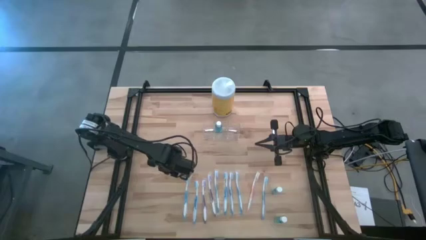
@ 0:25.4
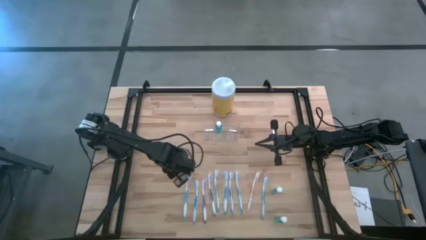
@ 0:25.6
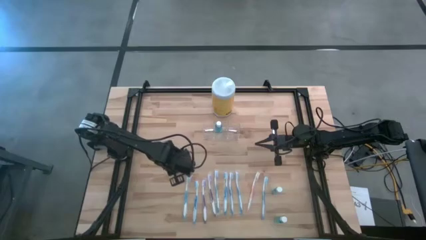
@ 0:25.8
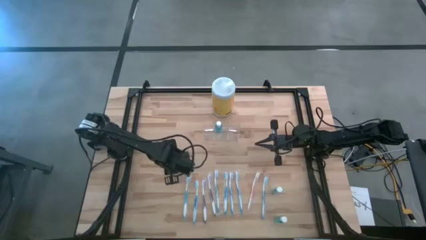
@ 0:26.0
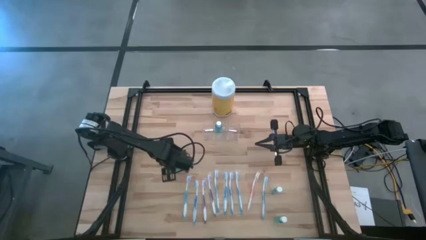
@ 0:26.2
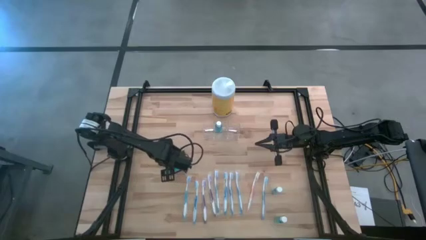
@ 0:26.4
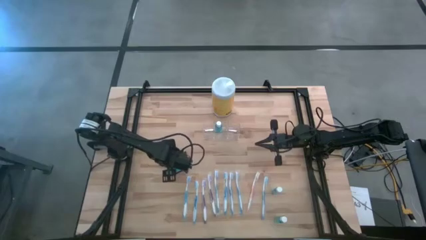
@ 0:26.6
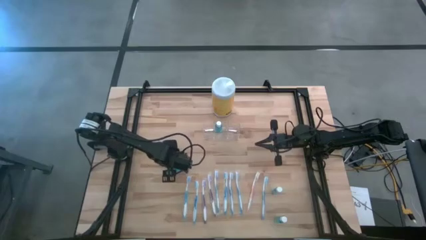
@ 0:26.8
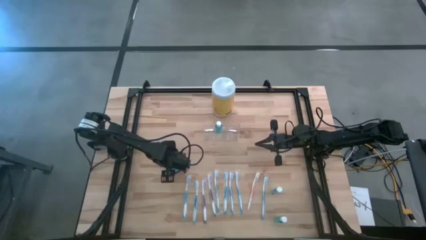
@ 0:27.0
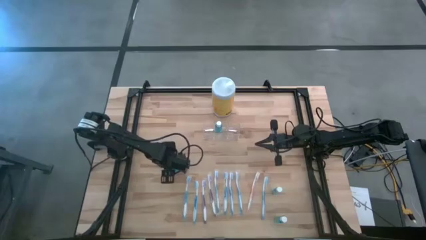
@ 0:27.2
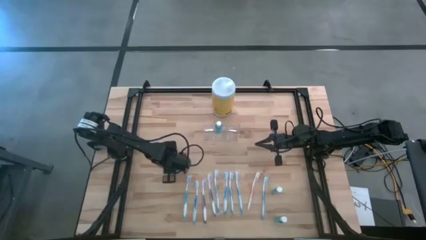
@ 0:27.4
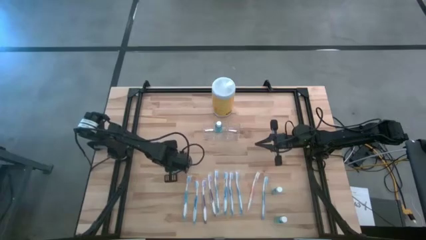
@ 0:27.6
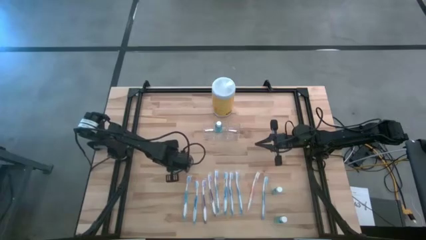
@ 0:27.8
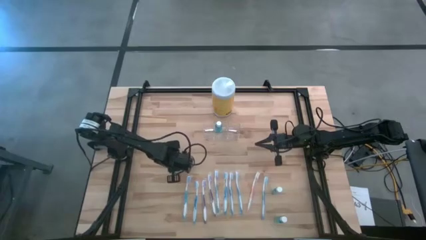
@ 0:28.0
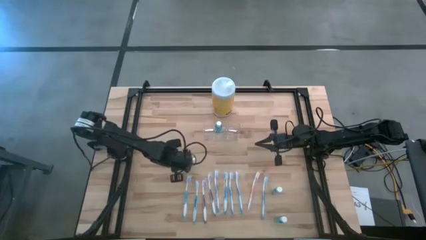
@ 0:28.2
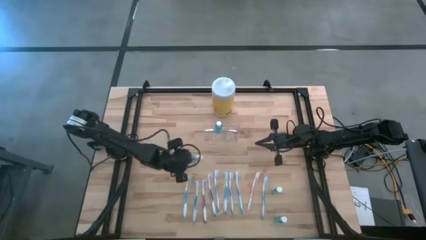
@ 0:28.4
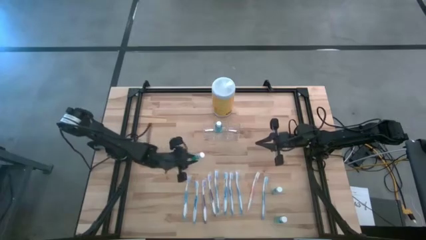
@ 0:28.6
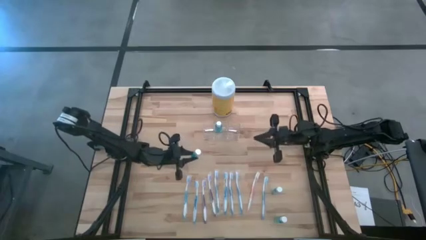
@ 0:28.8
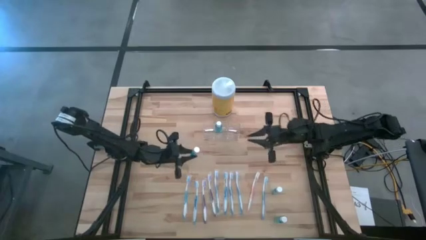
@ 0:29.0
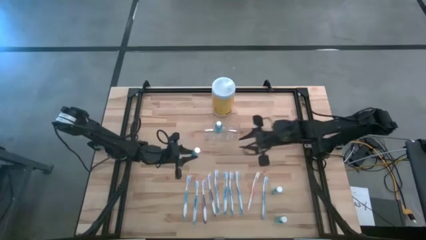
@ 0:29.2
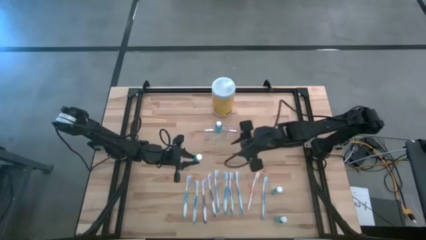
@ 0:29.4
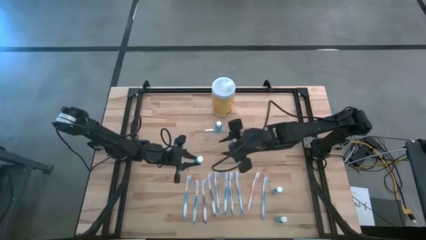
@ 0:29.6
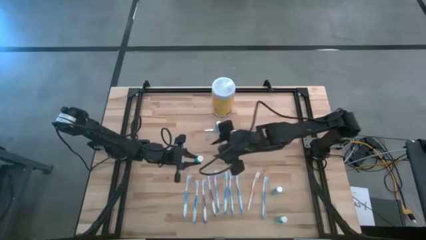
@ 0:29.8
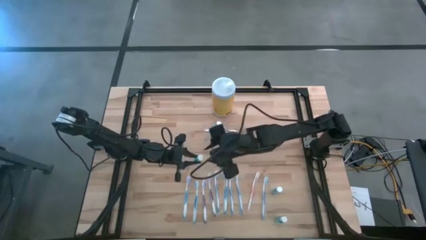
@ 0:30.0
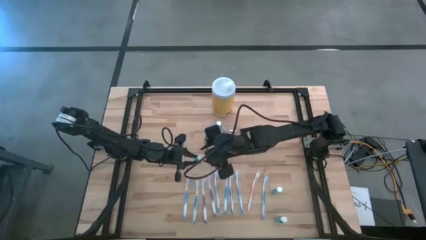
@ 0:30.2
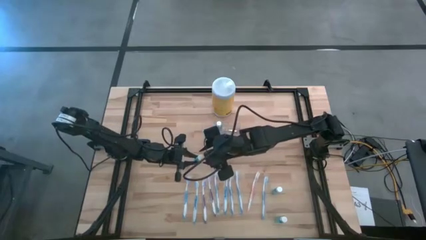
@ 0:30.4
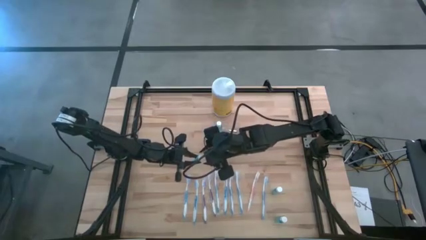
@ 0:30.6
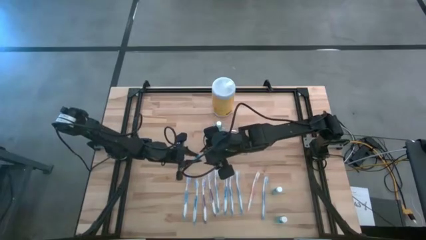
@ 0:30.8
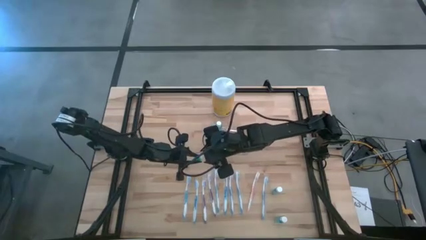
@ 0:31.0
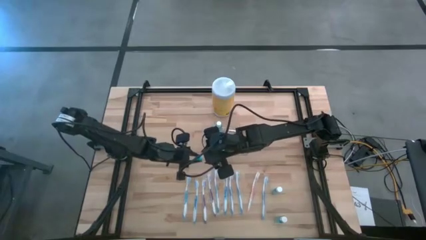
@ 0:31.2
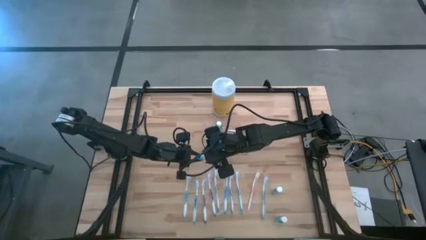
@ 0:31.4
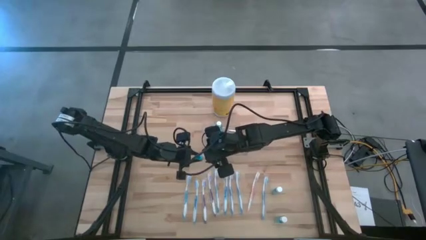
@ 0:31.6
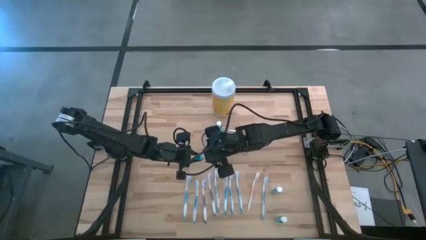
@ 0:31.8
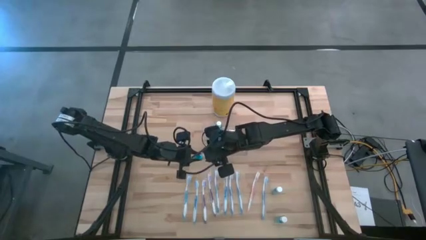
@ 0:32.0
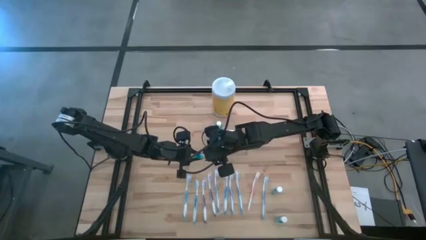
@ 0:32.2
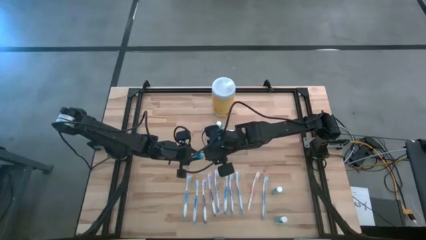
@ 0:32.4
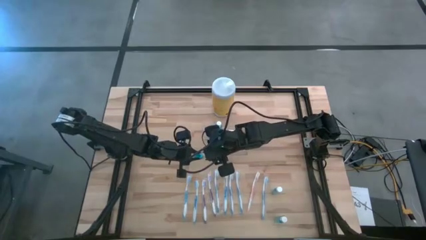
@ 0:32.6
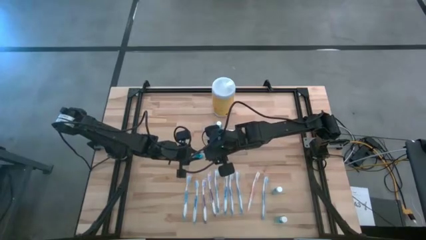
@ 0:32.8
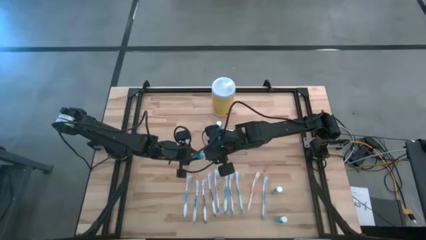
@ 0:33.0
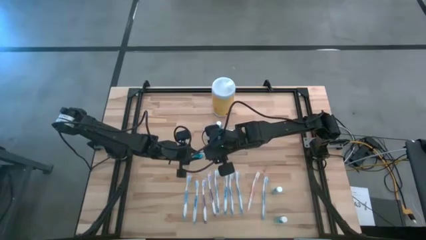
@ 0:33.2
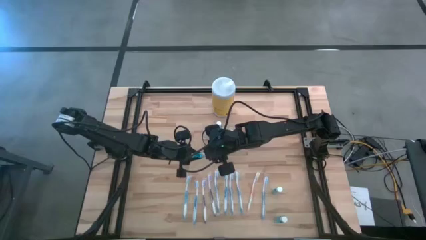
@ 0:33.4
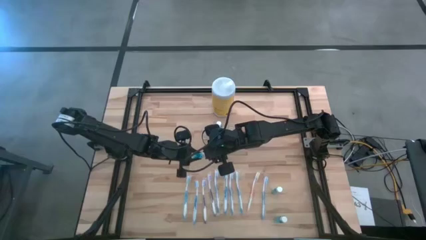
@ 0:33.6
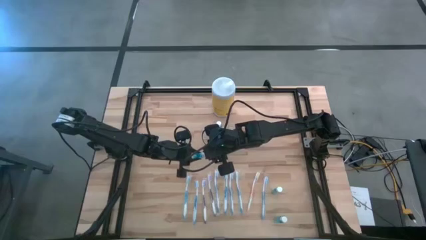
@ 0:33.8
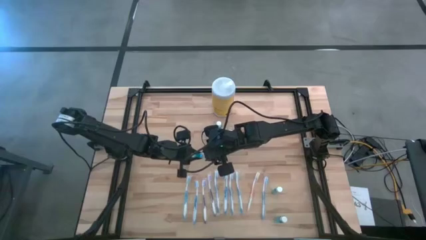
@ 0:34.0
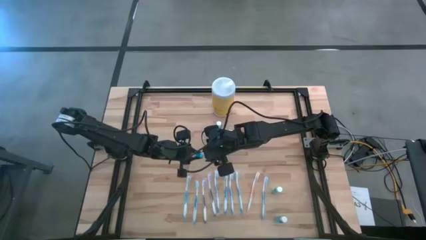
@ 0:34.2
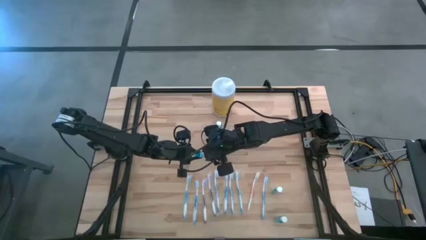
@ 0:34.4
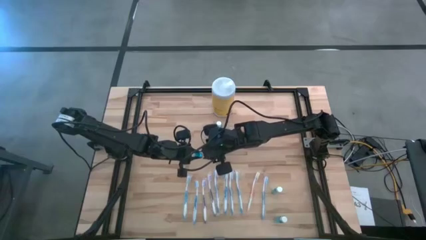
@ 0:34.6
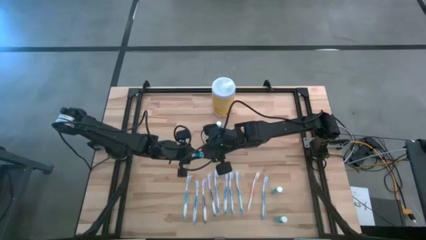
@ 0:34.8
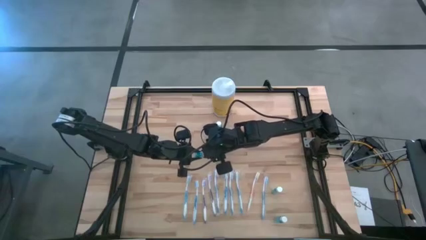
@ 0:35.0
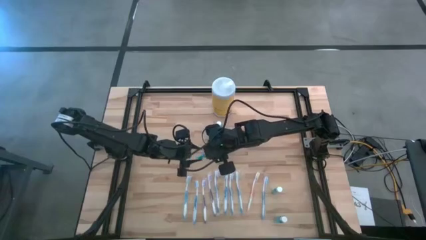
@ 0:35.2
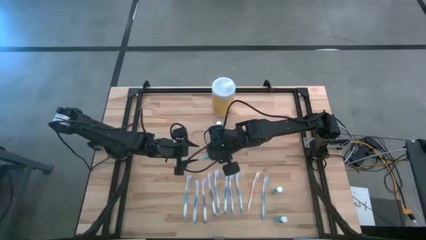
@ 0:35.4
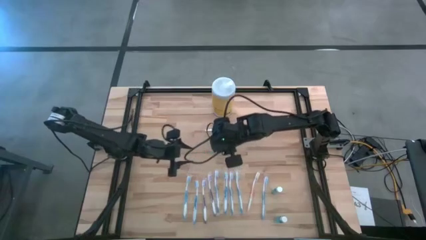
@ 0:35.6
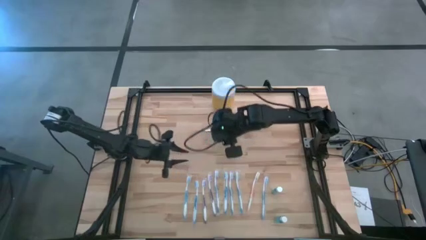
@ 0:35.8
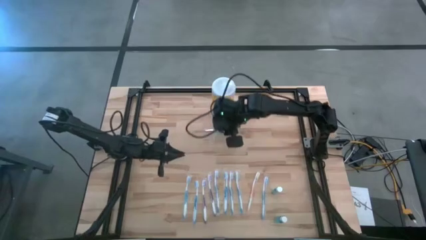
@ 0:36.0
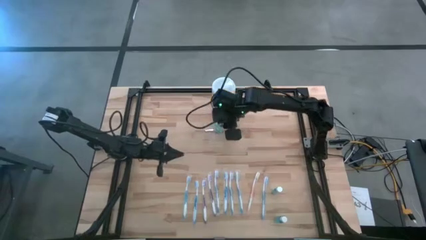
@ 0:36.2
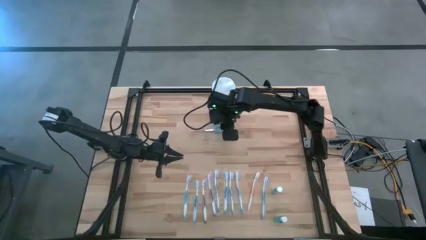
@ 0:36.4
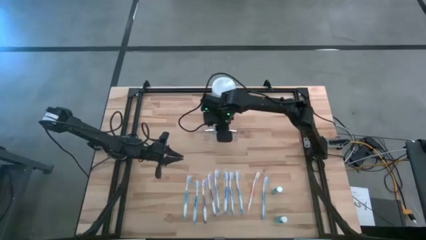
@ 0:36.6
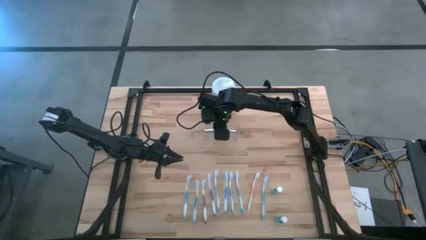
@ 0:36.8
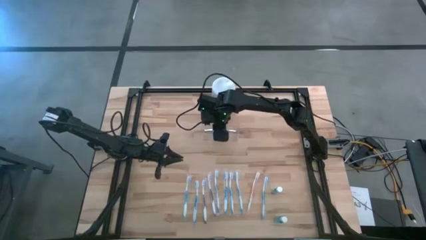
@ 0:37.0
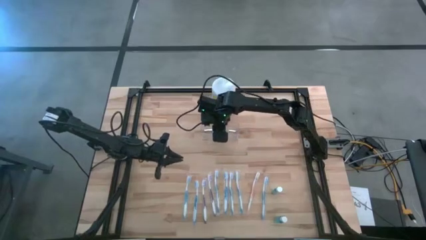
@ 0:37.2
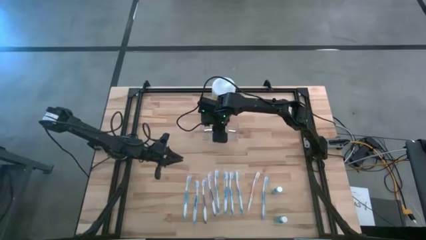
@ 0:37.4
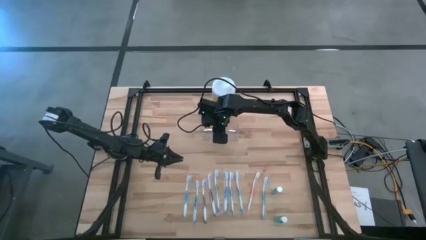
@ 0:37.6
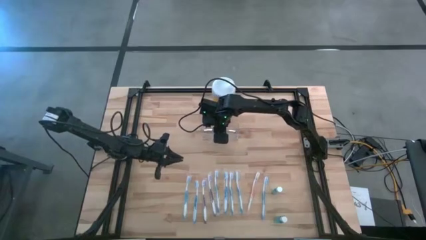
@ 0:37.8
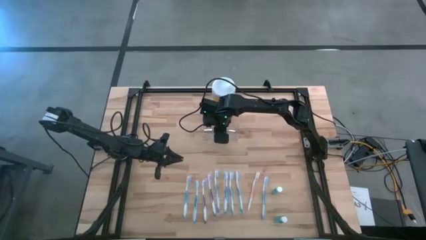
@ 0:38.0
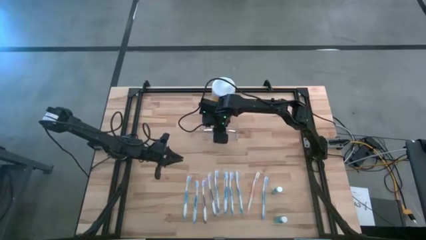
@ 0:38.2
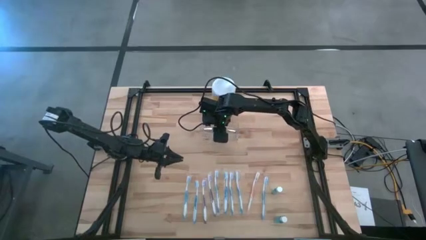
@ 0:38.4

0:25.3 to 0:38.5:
Task: Pick & Place toothbrushing station
Put the blue mouthwash into the transparent organizer
